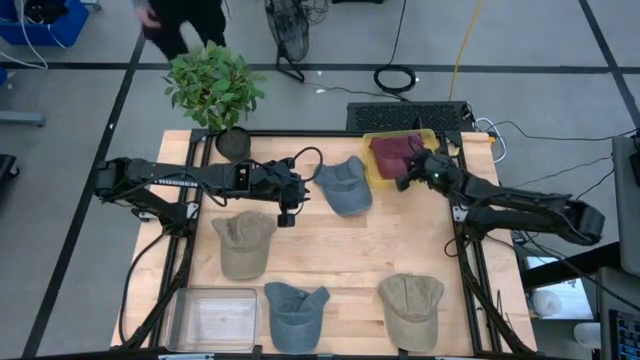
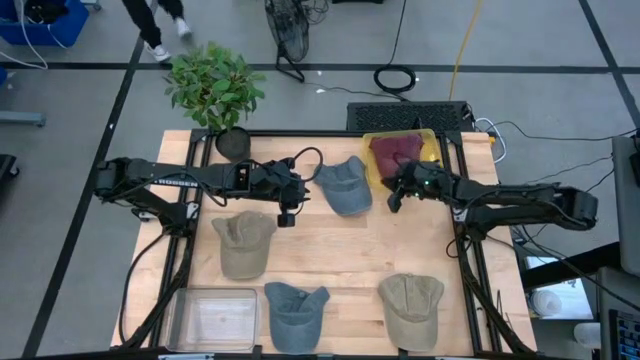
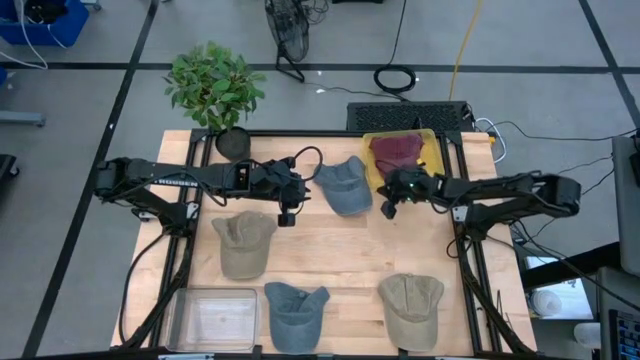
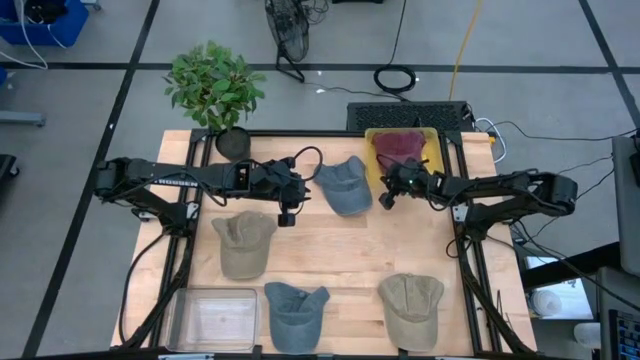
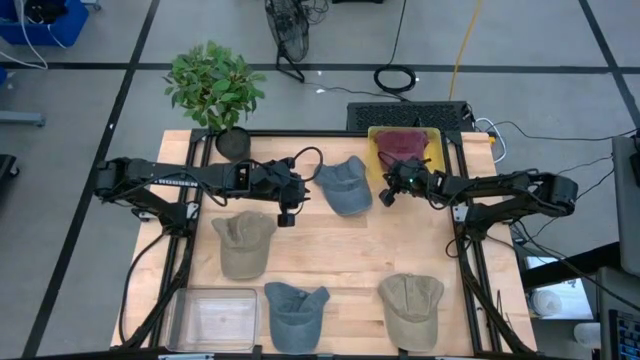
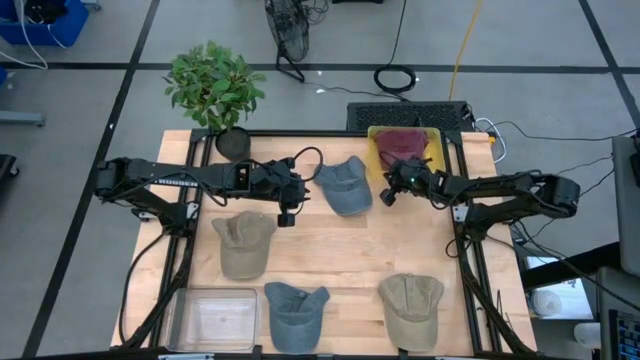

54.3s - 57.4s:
Task: Pick & Place hat
Adjust the yellow bin

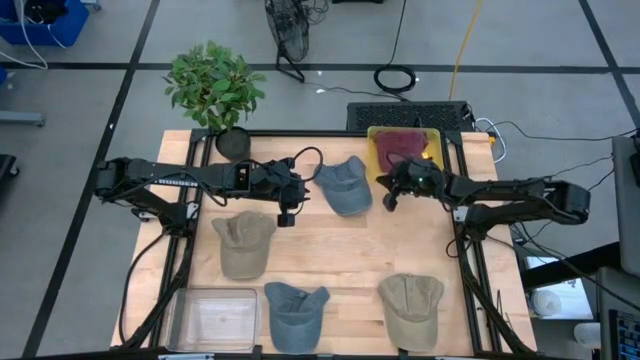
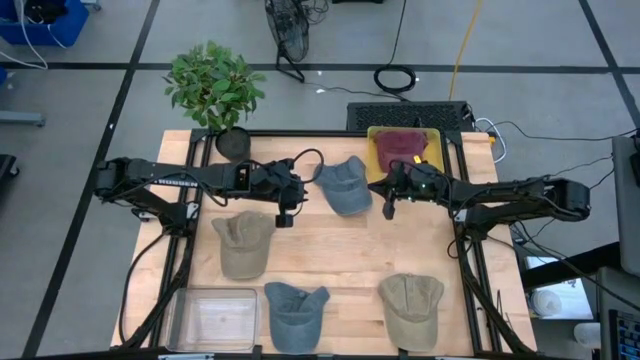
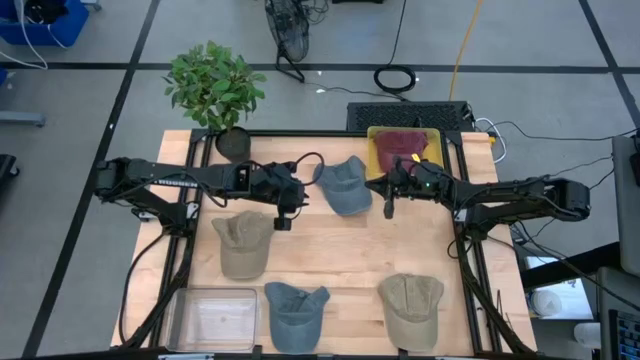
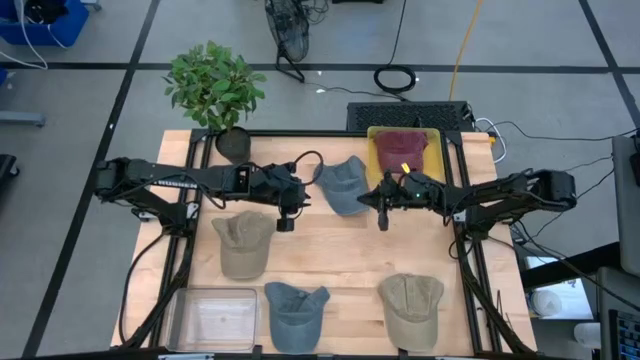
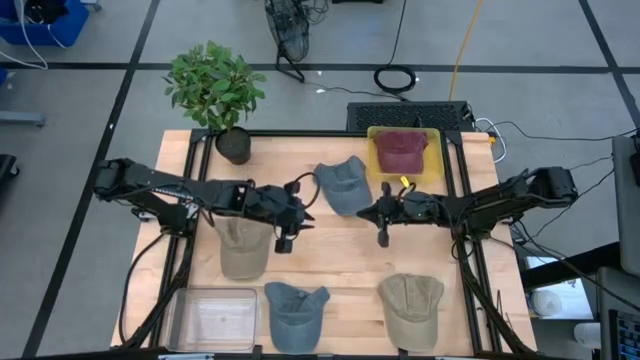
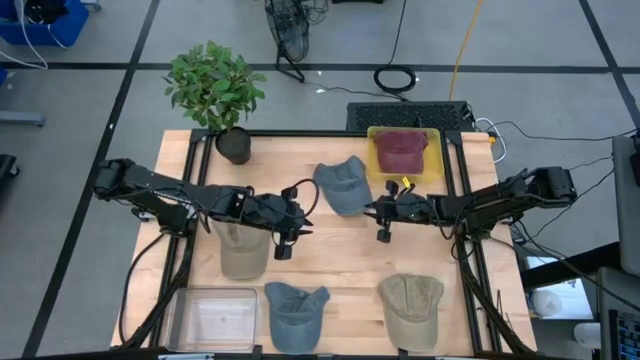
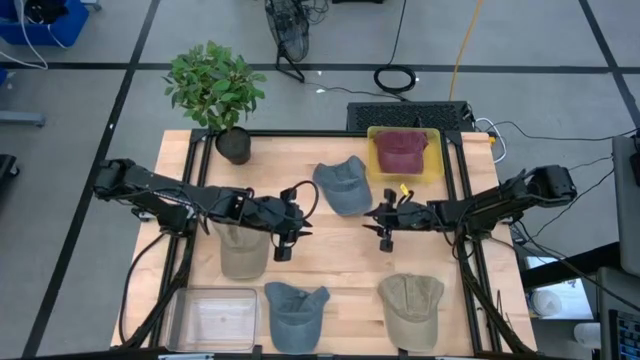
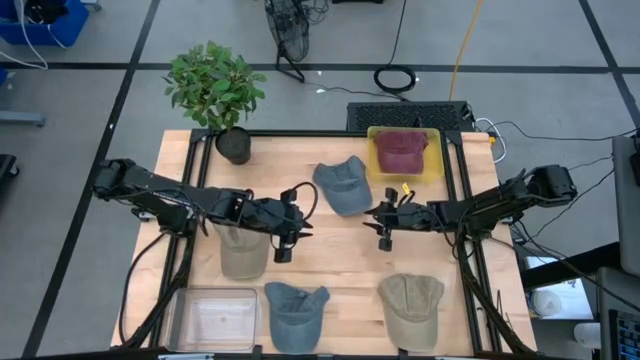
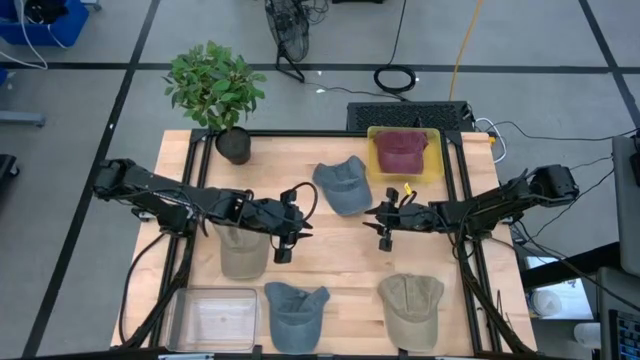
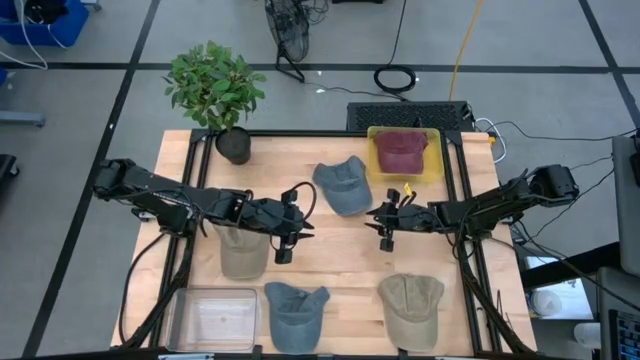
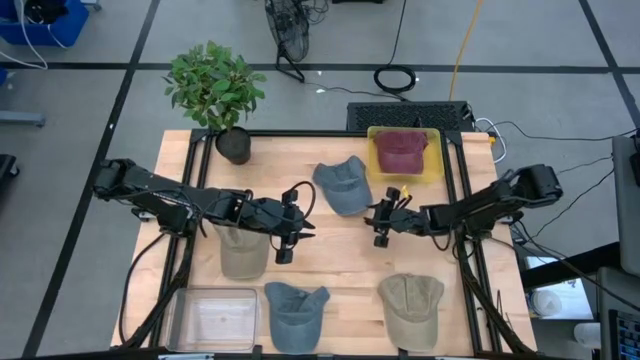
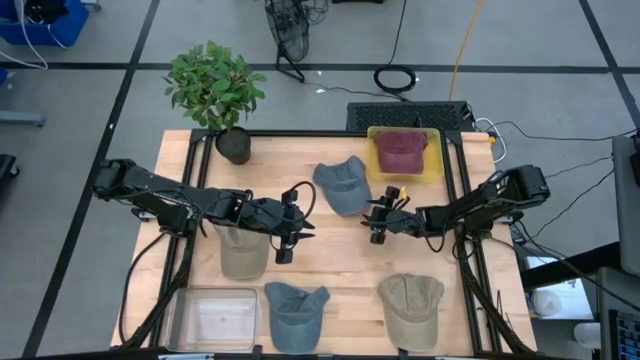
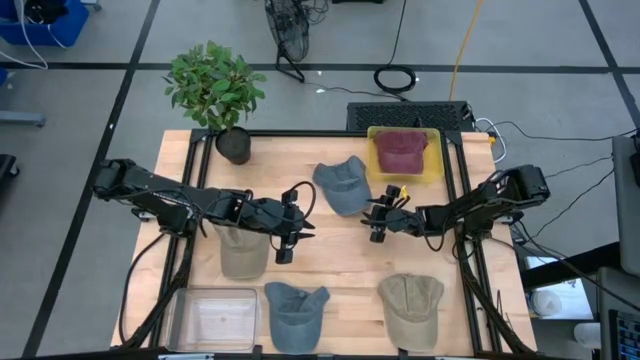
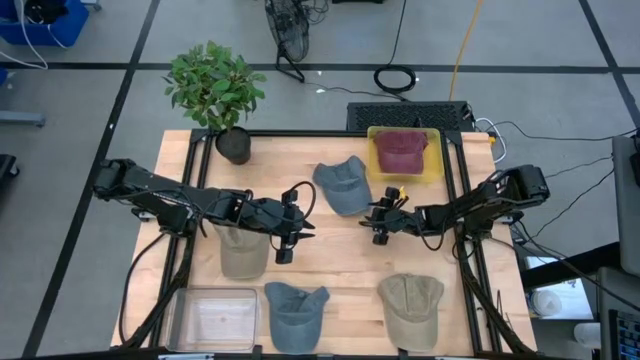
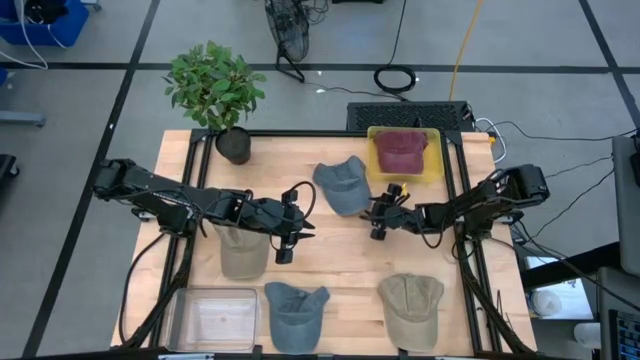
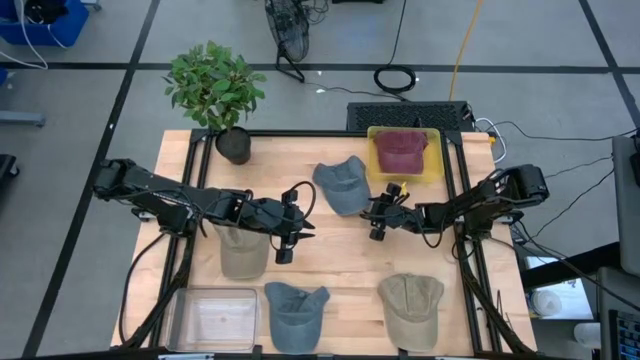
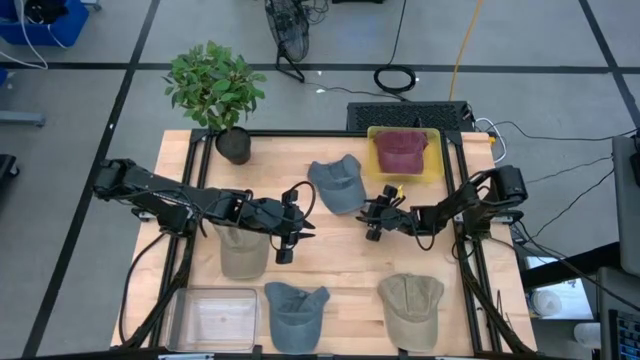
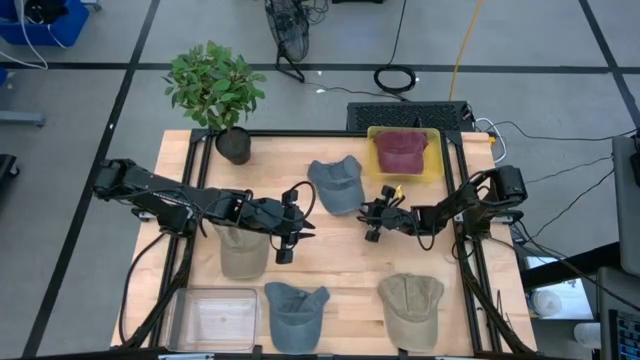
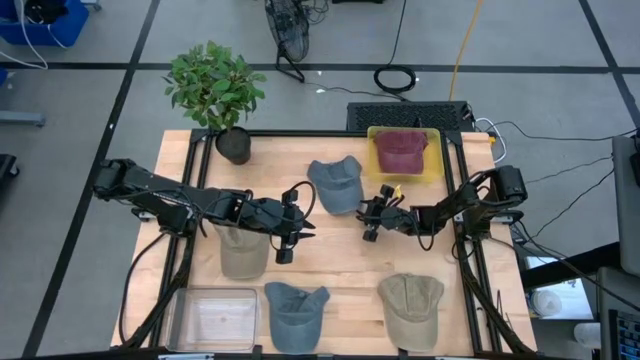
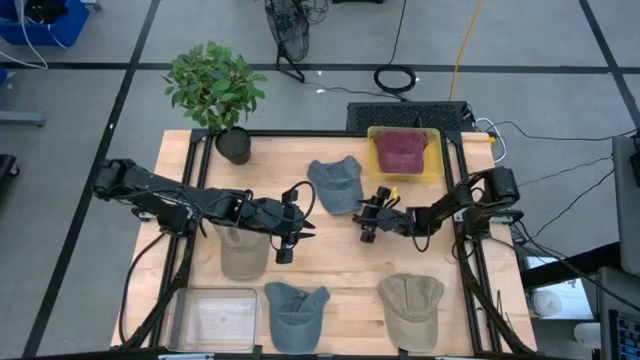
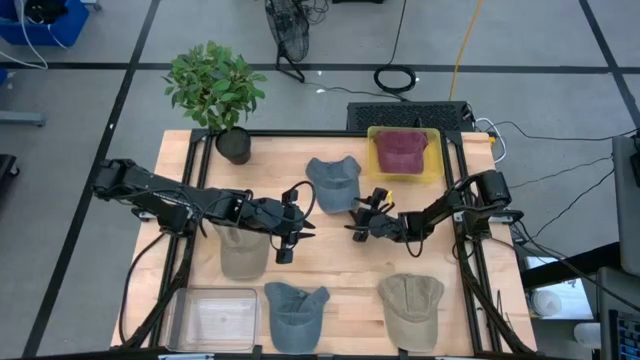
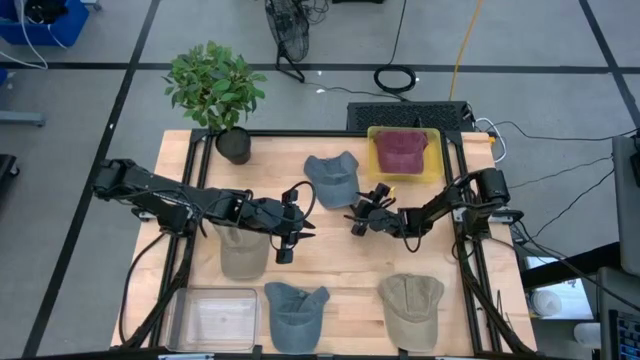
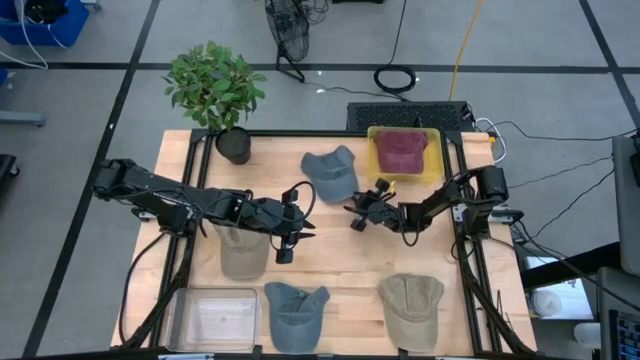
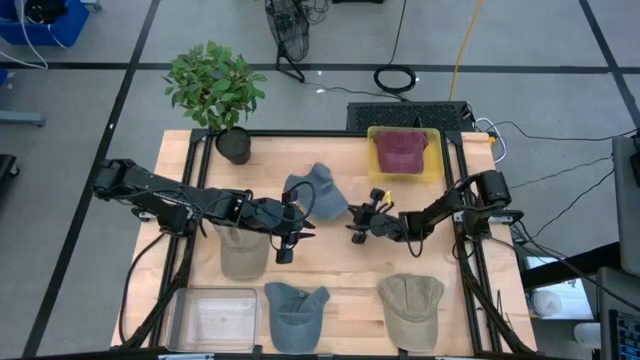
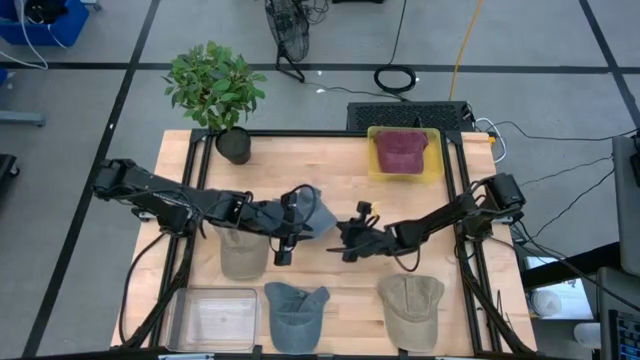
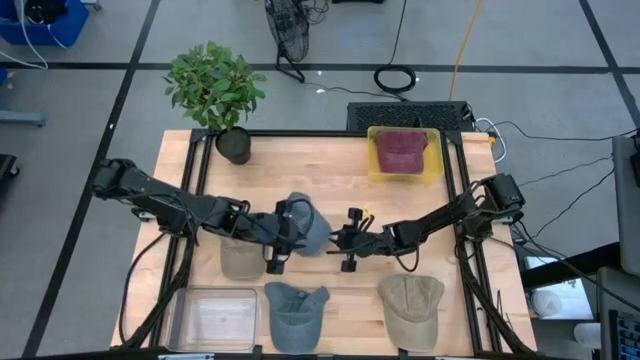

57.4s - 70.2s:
Put the gray cap into the transparent bin

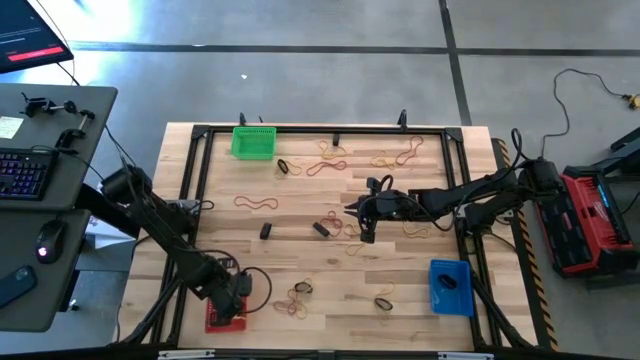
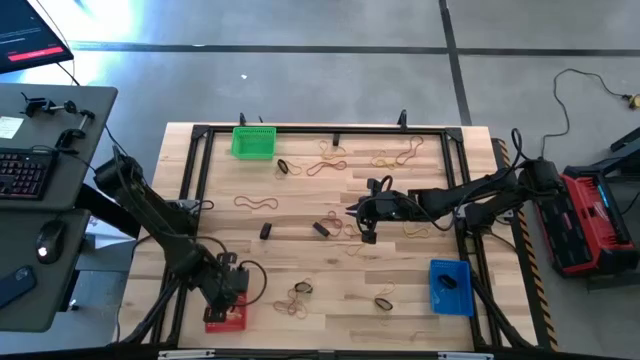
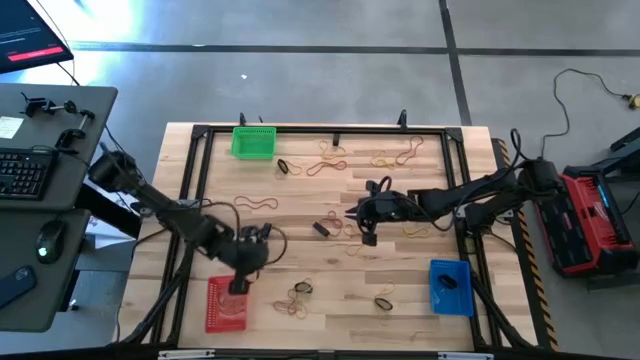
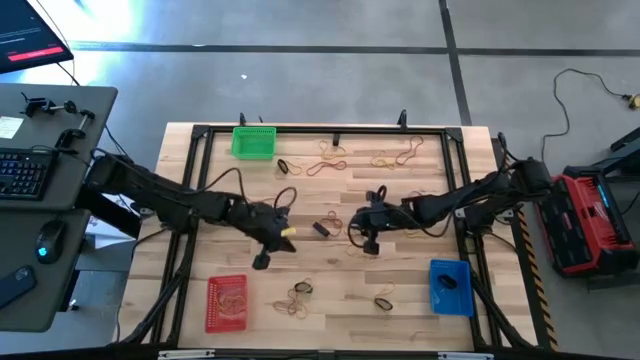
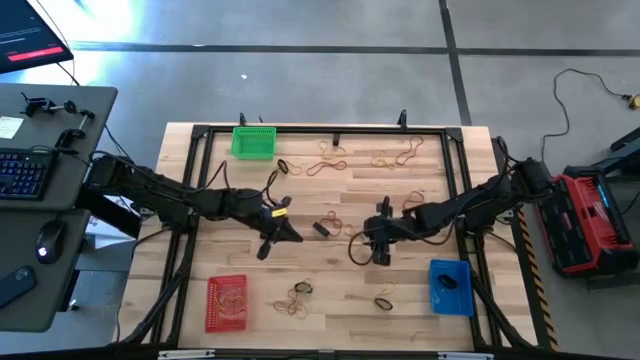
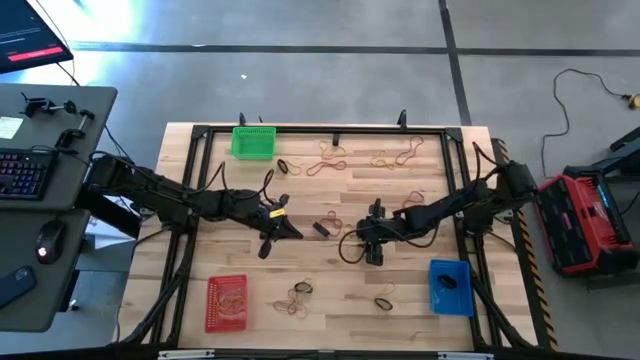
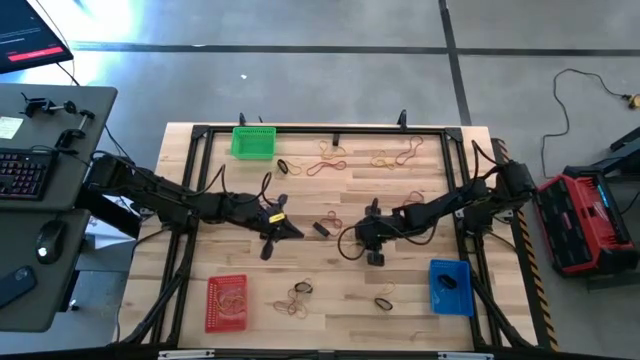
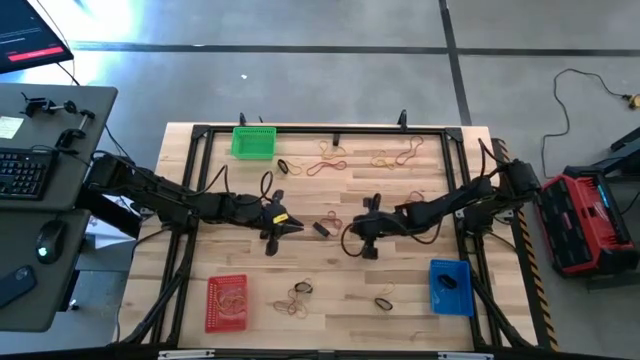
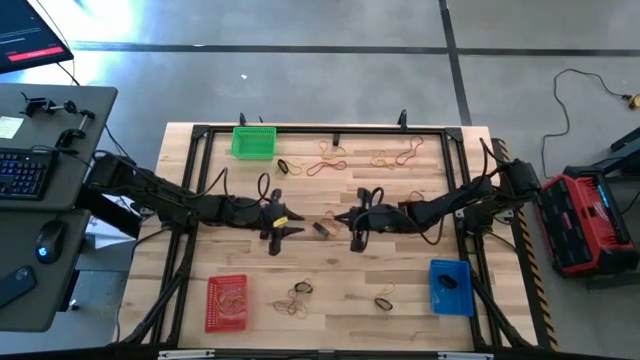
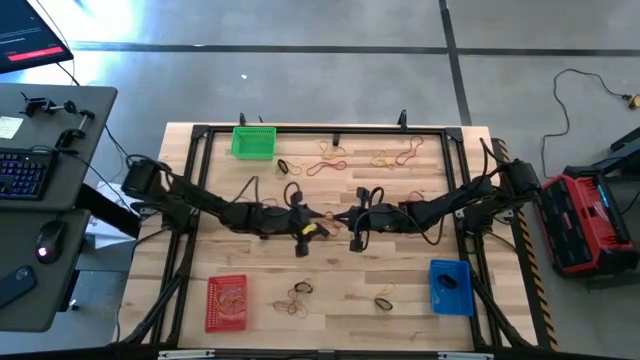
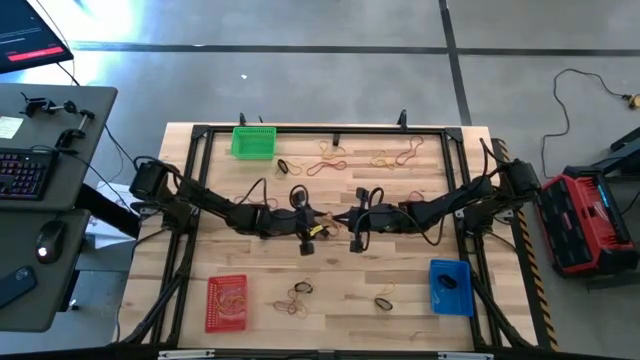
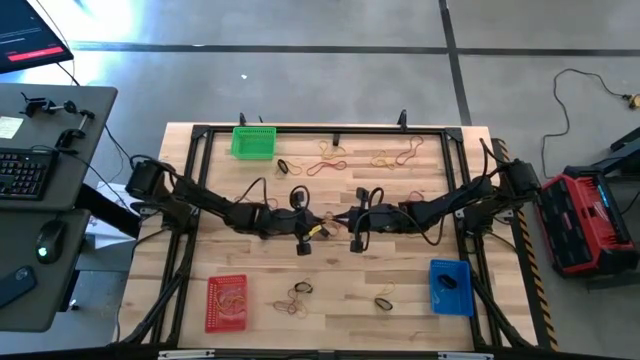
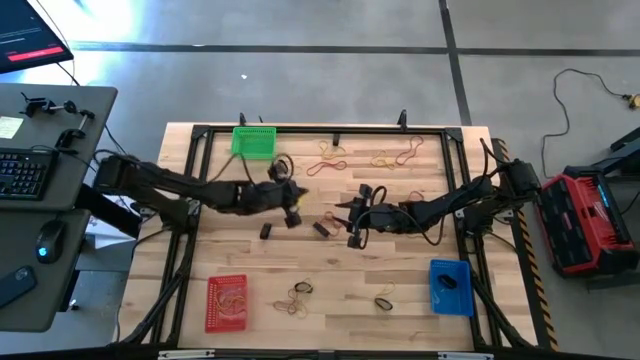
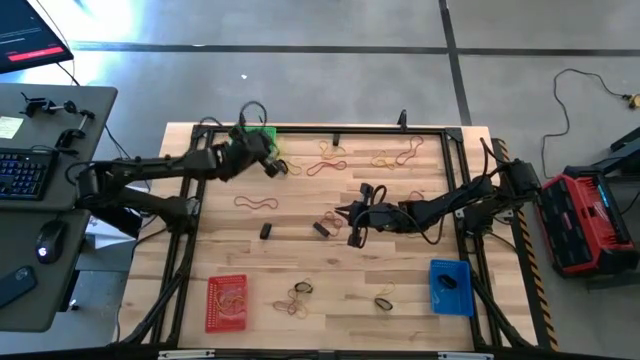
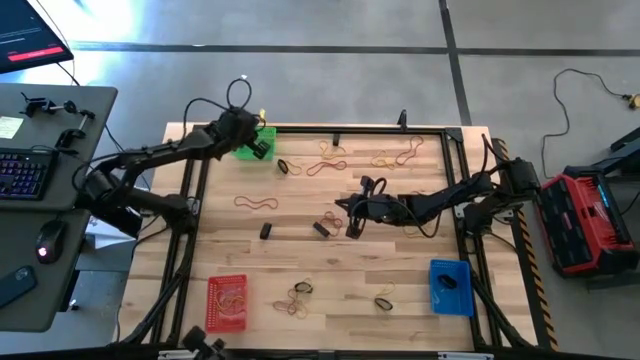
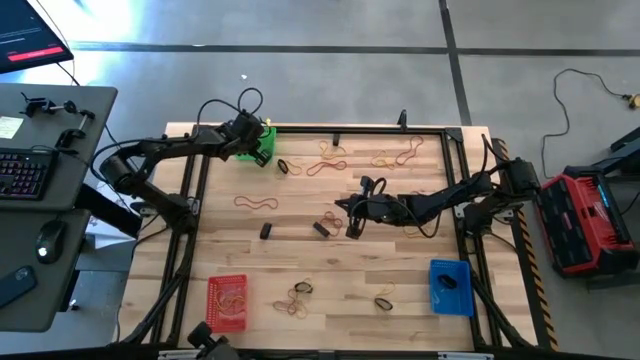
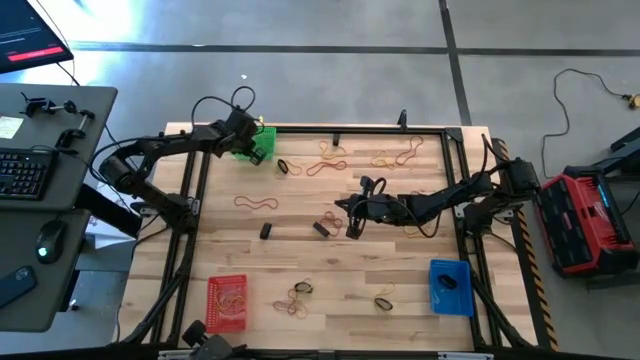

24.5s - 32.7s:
Task: Sort rubber bands into baskets
Put the yellow rubber band into the red bin
